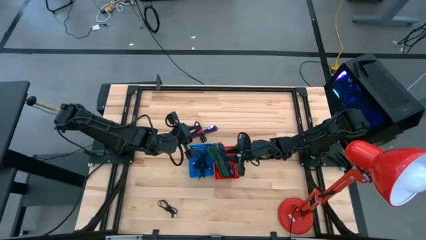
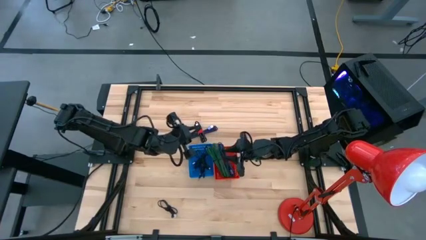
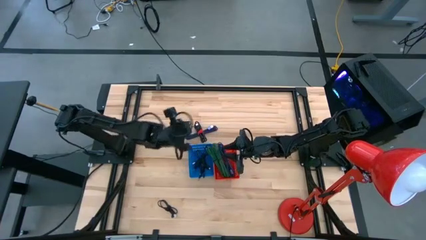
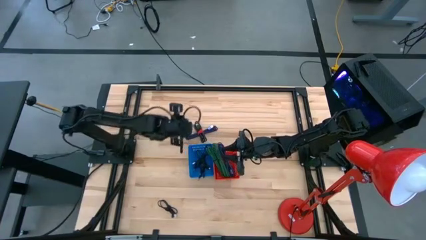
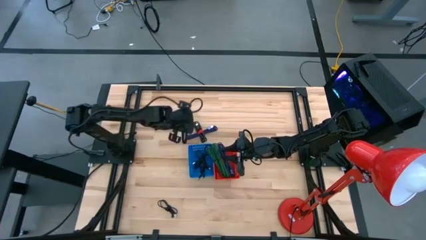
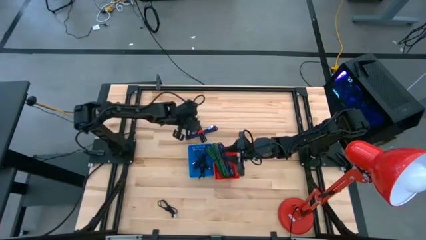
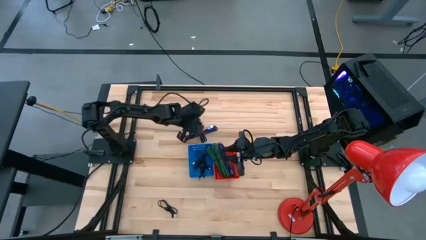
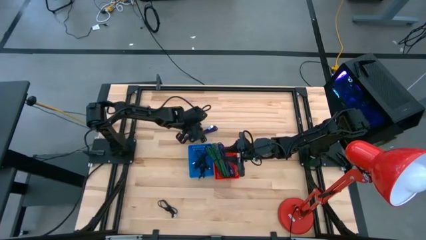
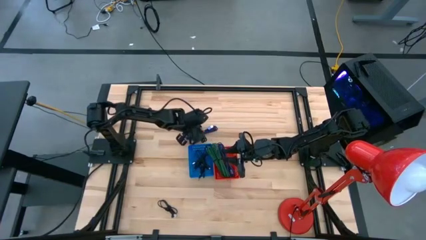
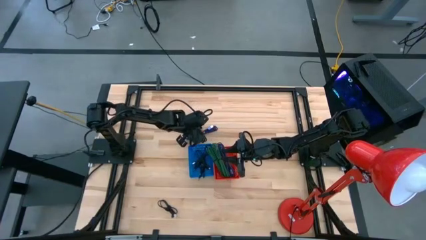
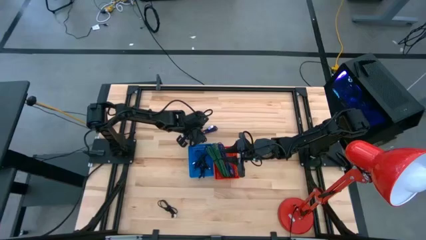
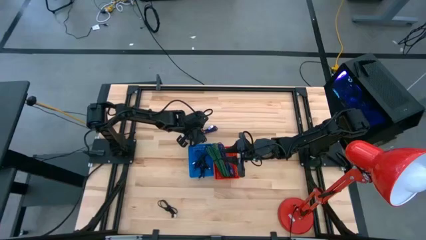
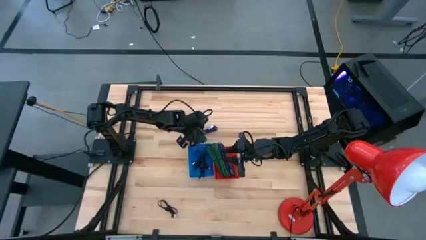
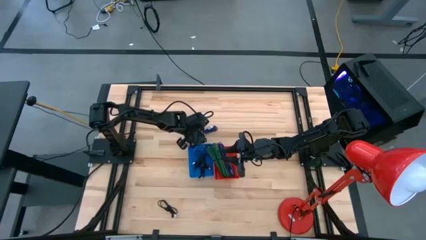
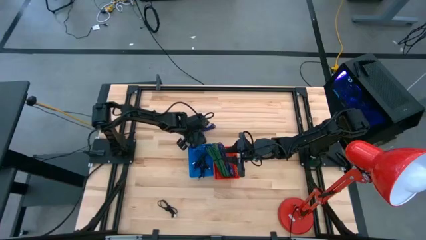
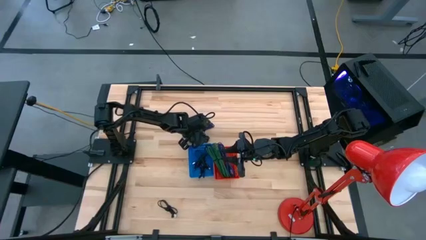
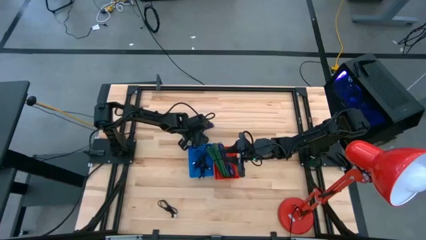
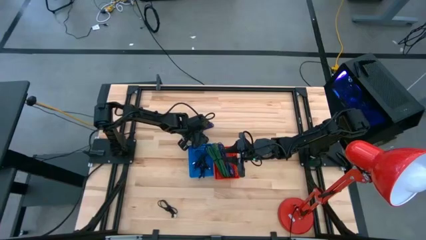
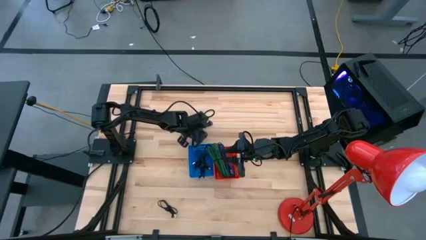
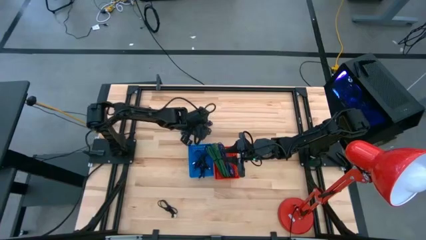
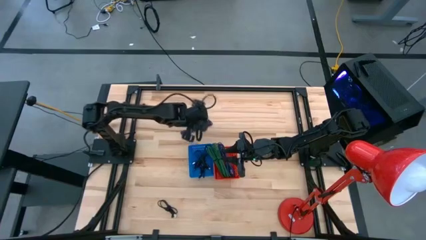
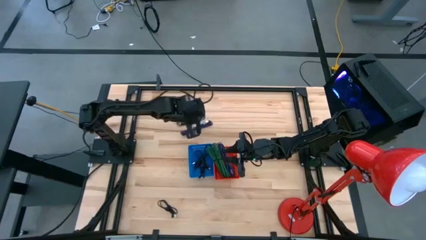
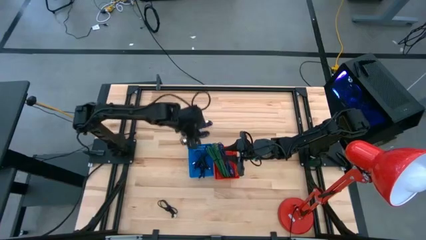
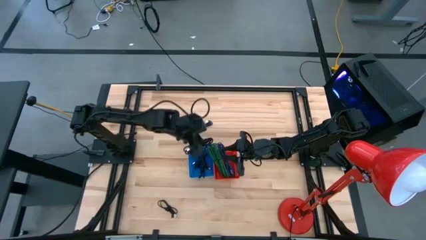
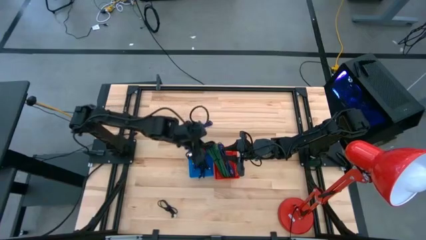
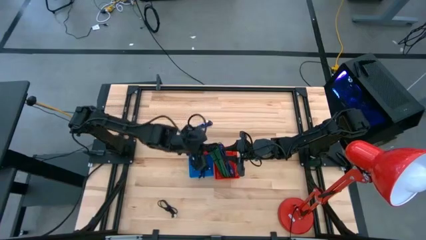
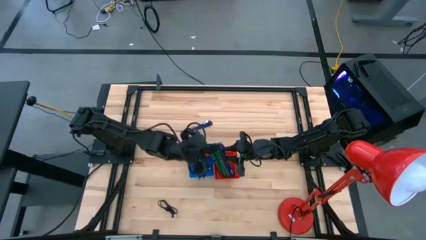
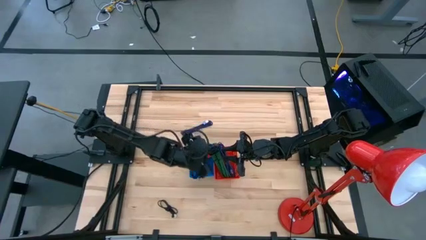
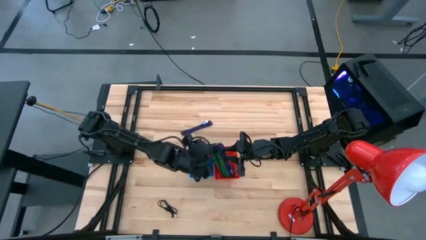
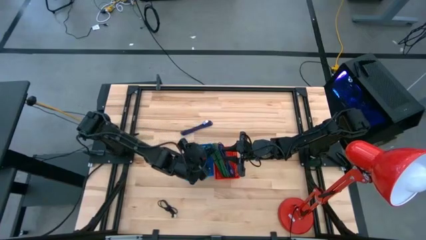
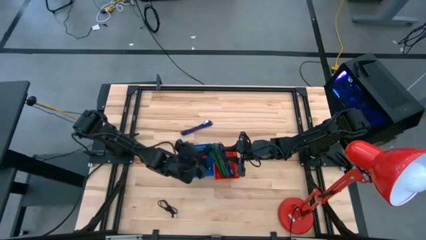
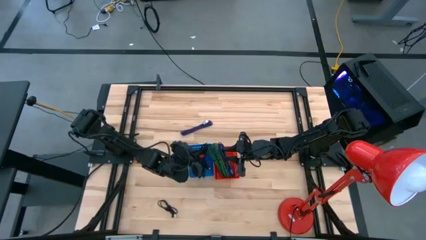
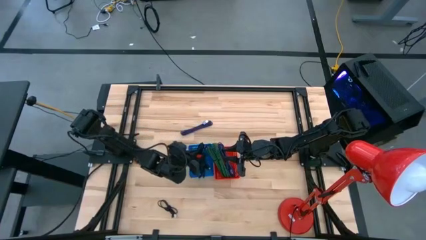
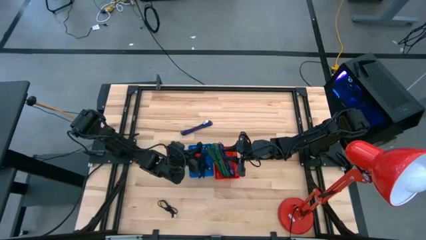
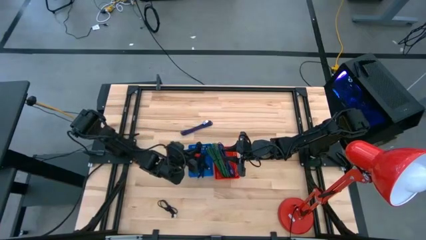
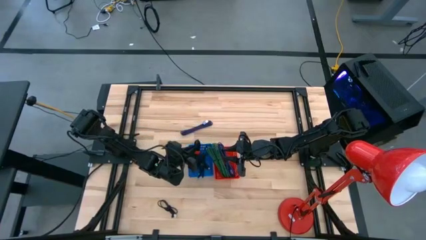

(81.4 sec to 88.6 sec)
Task: Pick & Place USB Port
Put the black USB cable into the blue basket

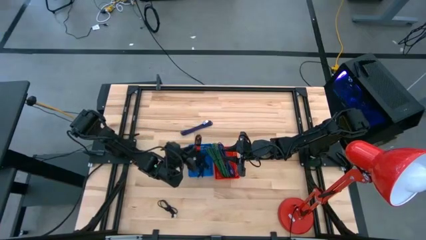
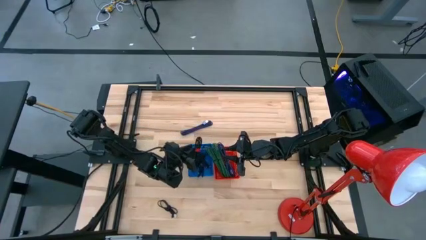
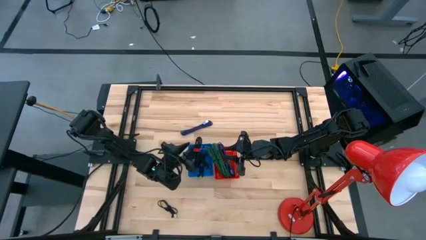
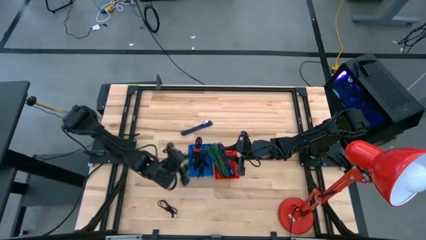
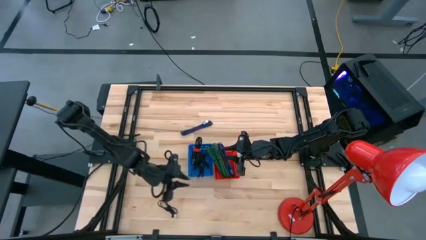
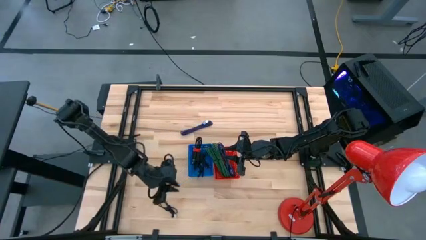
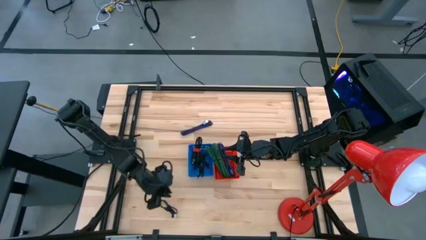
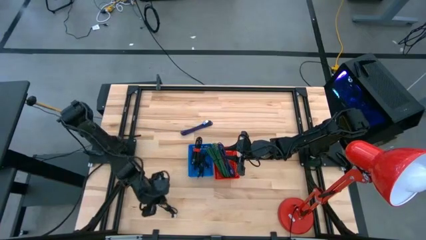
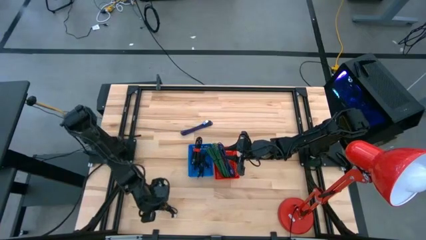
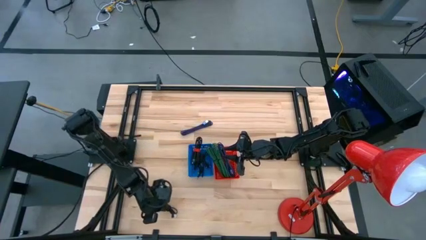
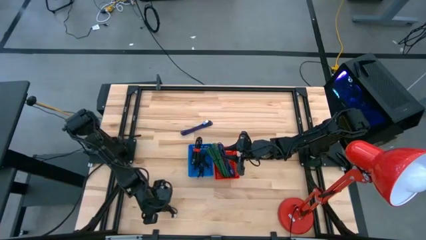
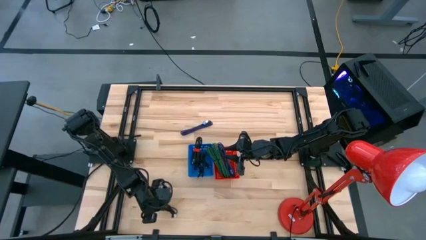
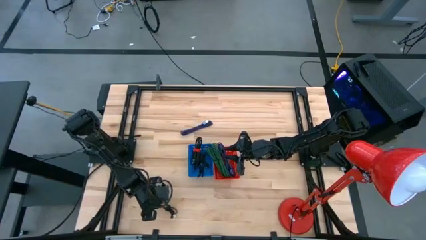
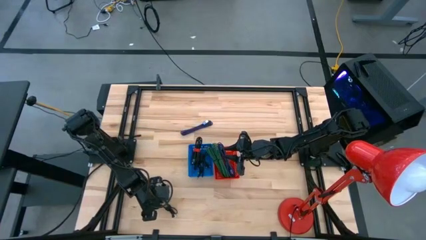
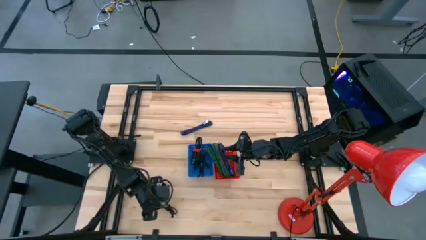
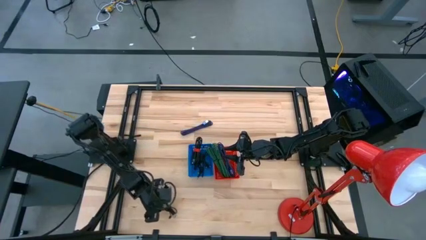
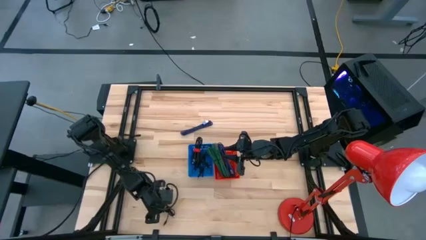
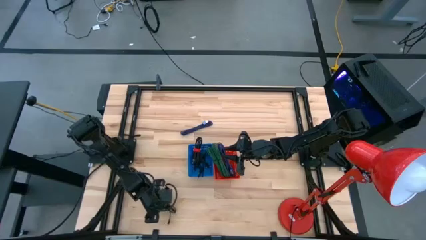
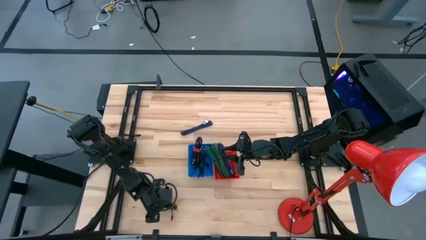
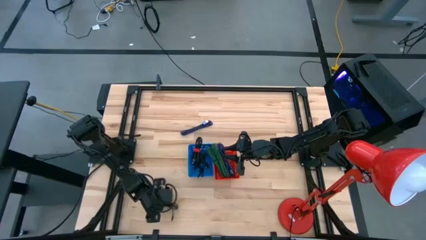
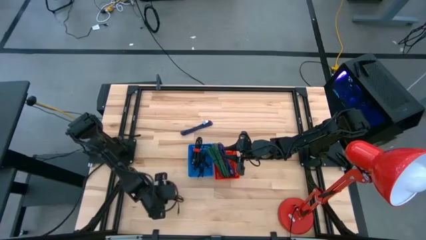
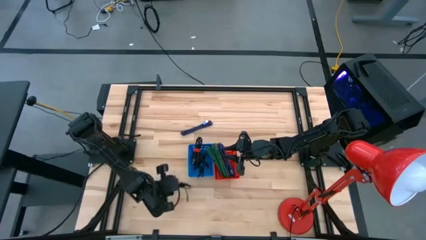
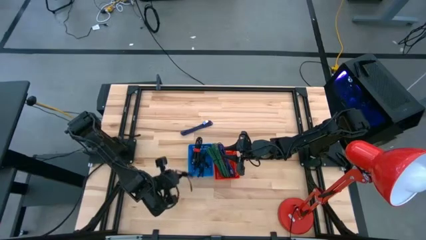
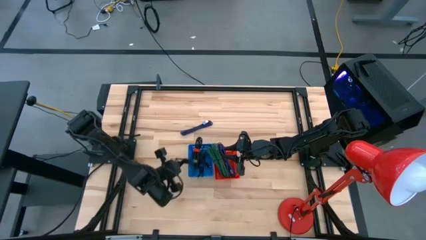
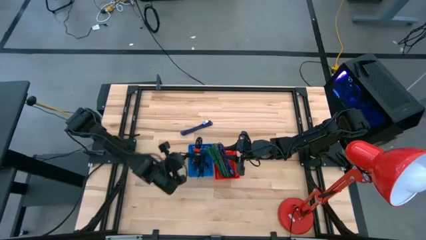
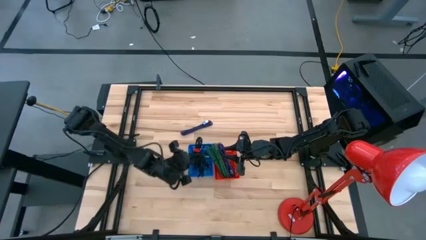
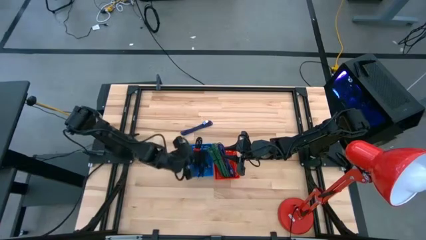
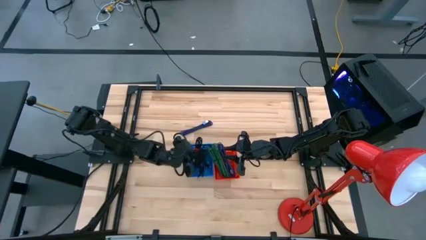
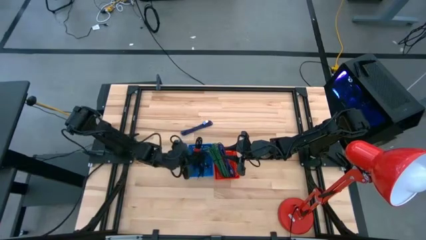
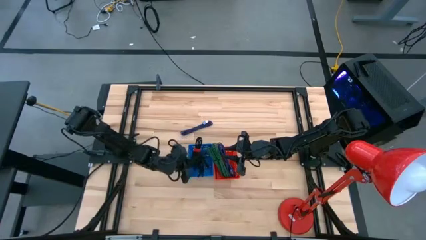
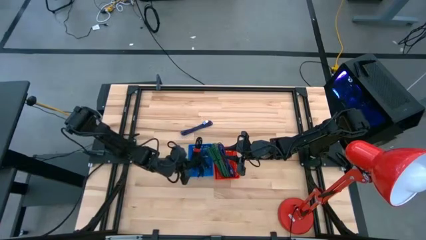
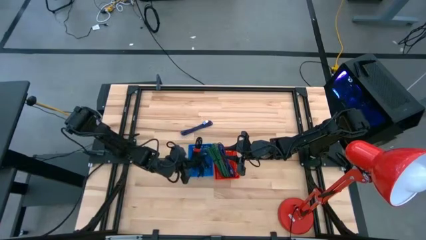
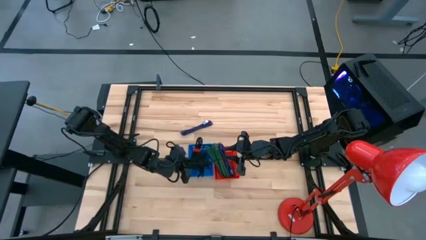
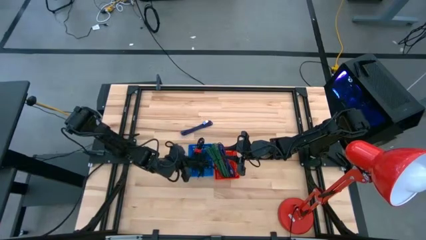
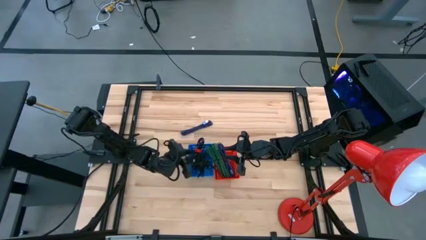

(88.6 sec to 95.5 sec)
Put the black USB cable into the blue basket
